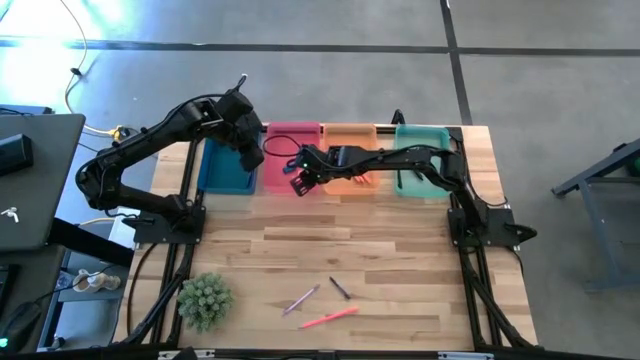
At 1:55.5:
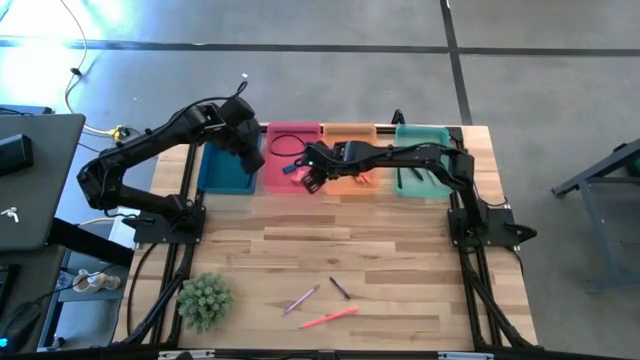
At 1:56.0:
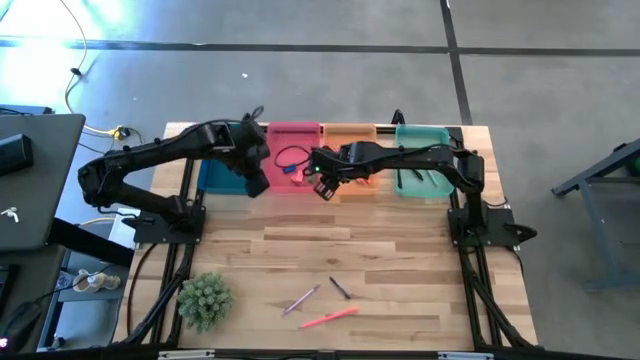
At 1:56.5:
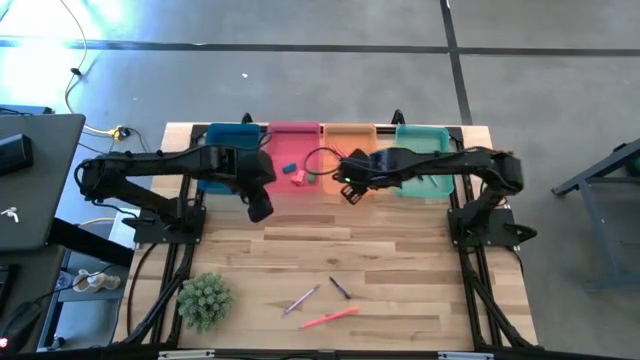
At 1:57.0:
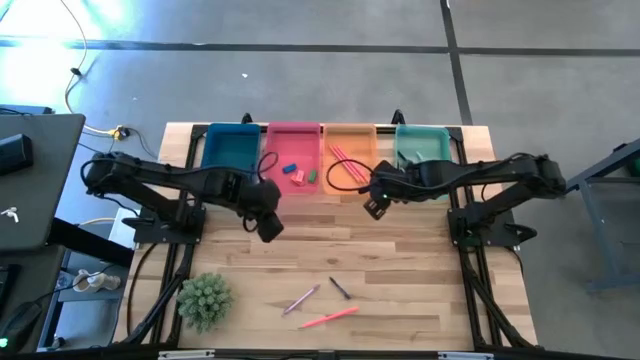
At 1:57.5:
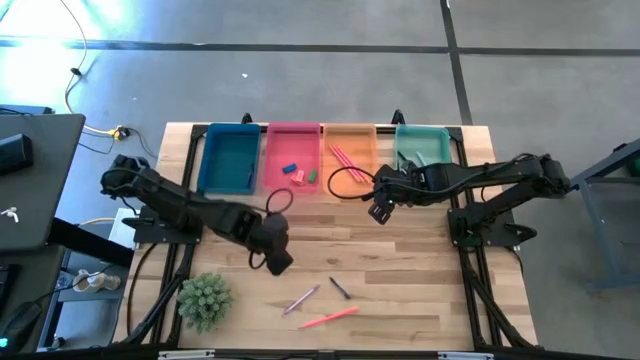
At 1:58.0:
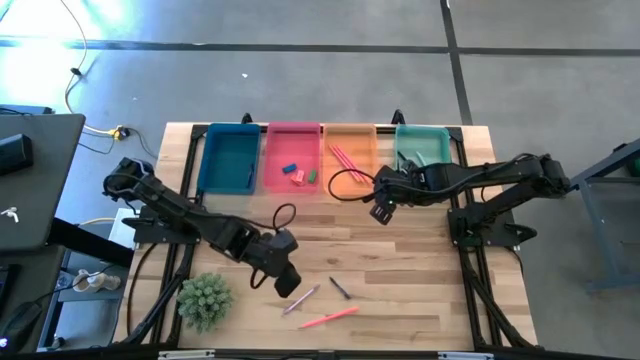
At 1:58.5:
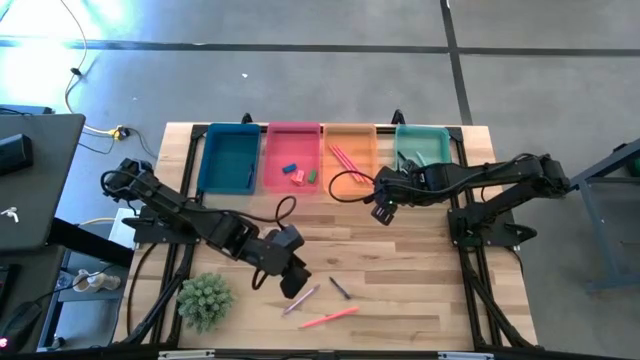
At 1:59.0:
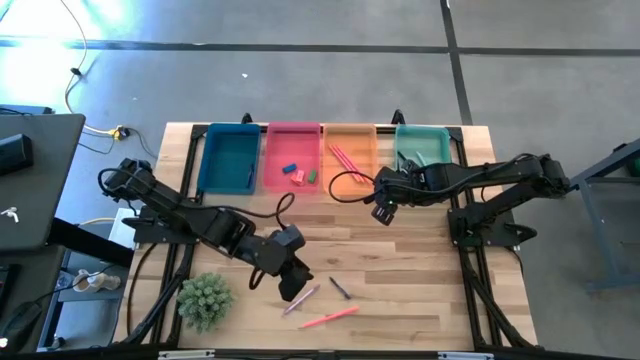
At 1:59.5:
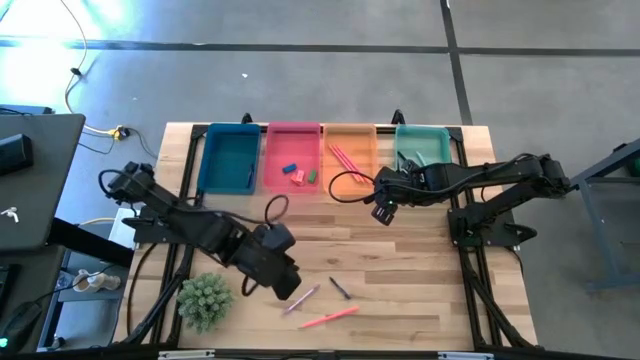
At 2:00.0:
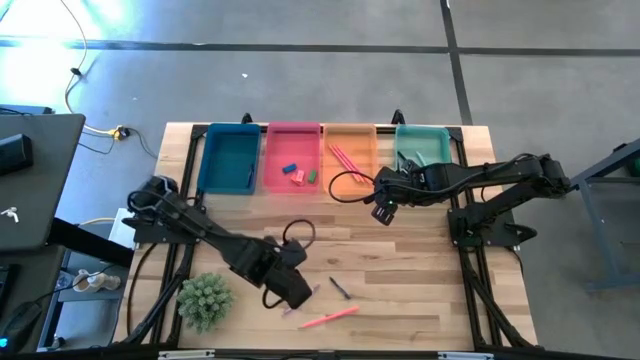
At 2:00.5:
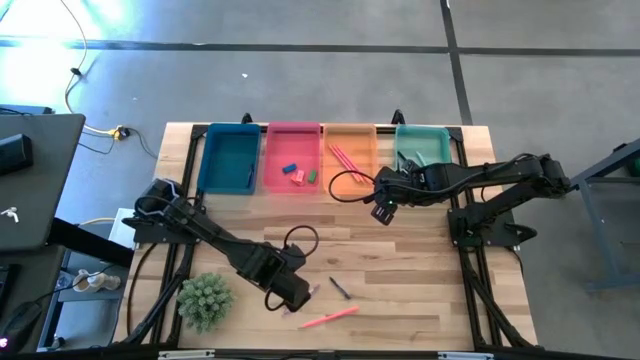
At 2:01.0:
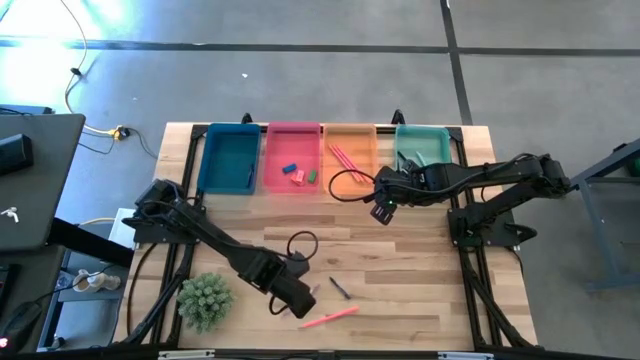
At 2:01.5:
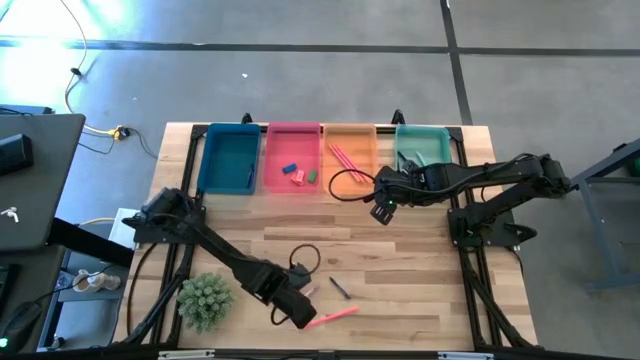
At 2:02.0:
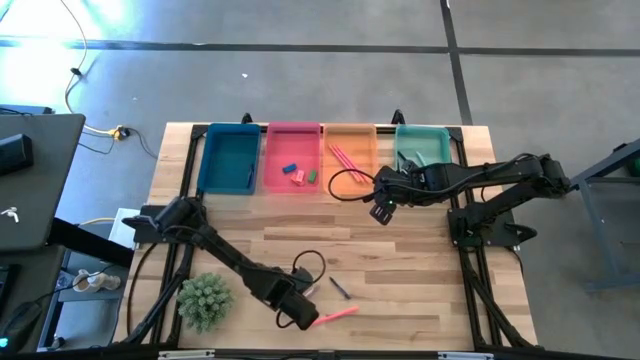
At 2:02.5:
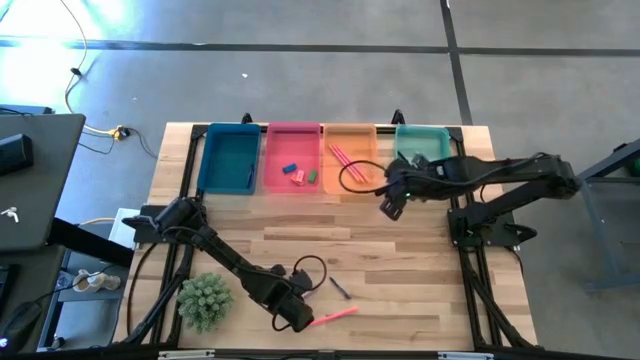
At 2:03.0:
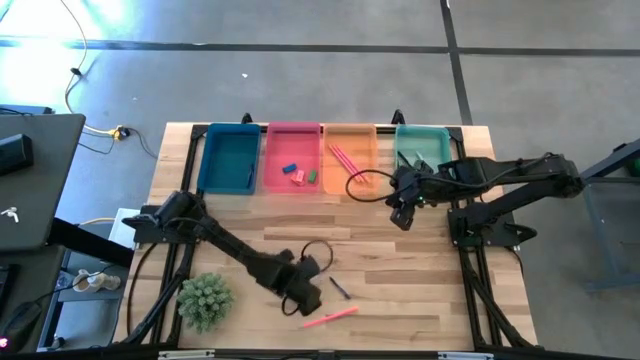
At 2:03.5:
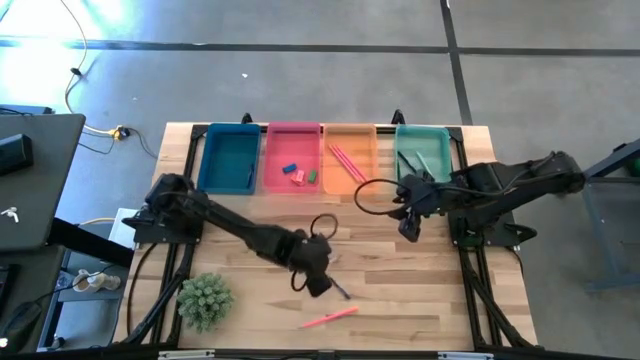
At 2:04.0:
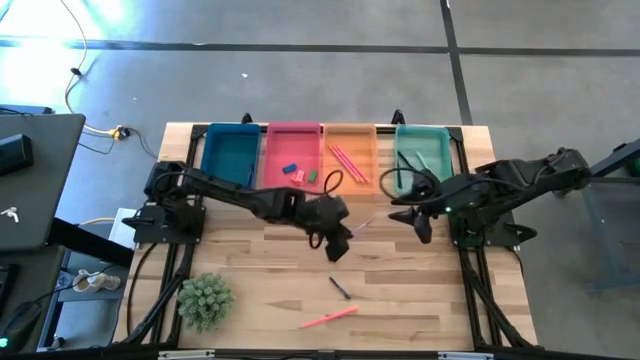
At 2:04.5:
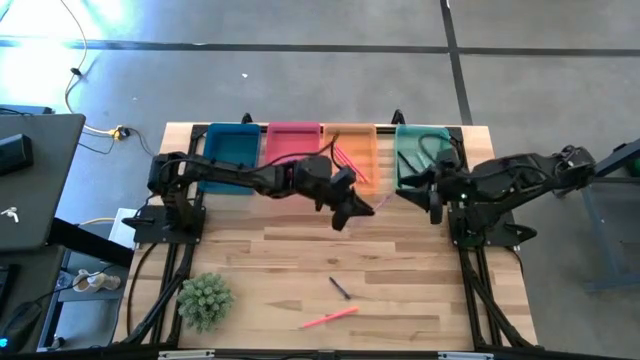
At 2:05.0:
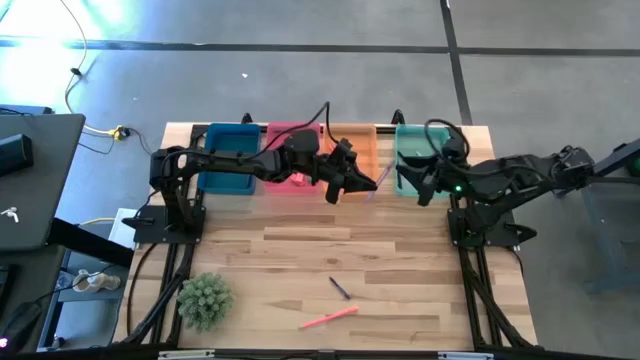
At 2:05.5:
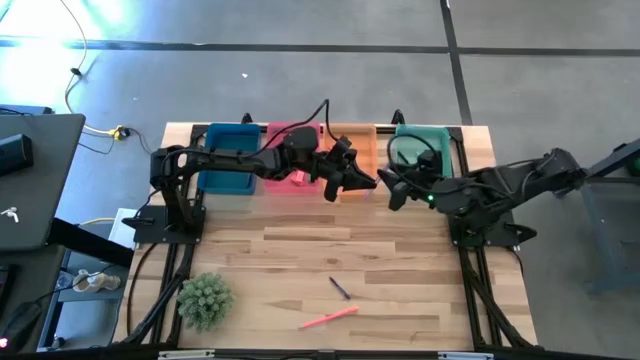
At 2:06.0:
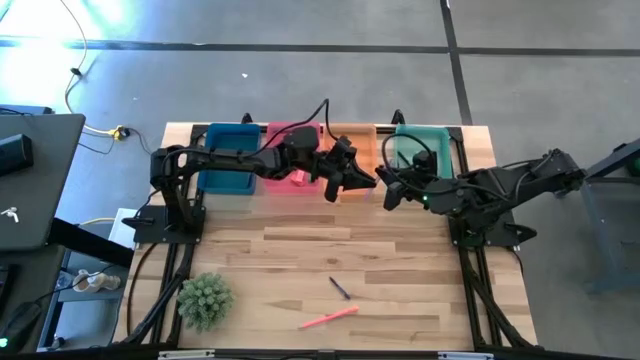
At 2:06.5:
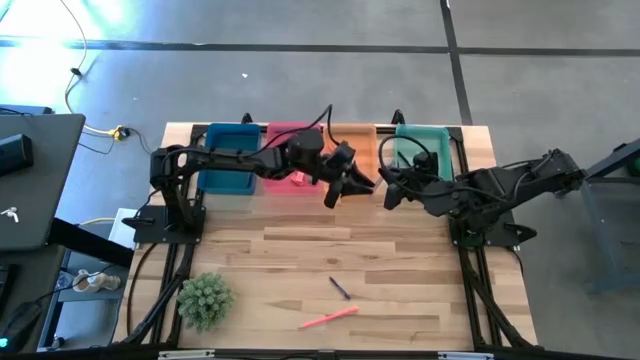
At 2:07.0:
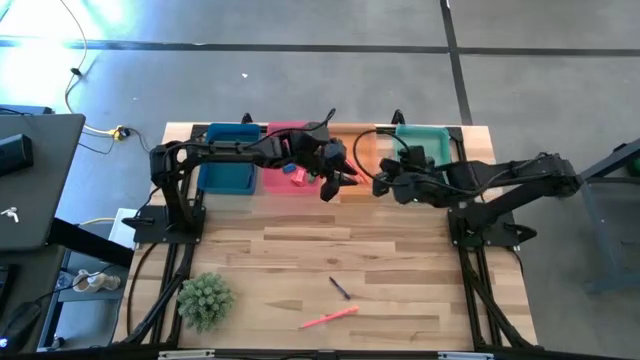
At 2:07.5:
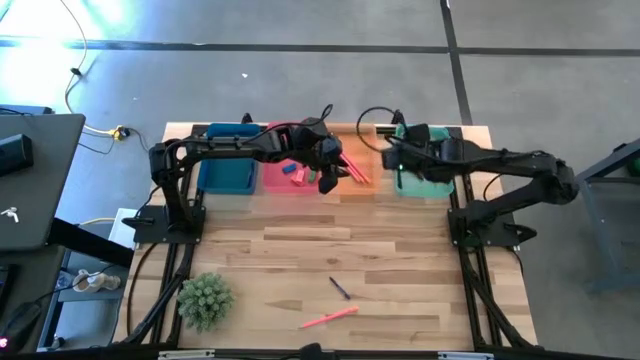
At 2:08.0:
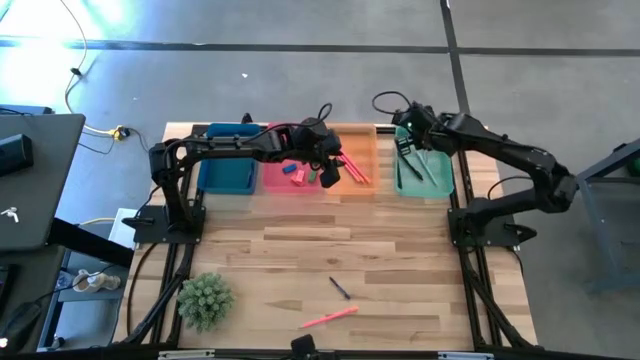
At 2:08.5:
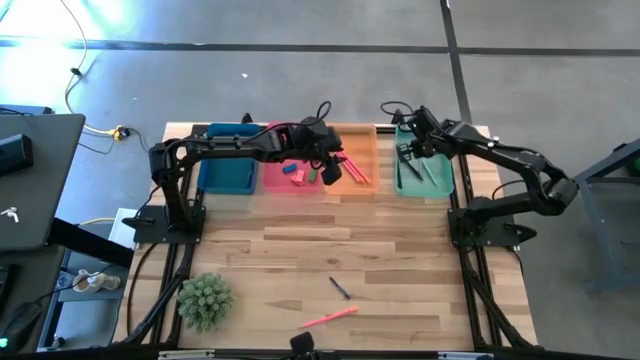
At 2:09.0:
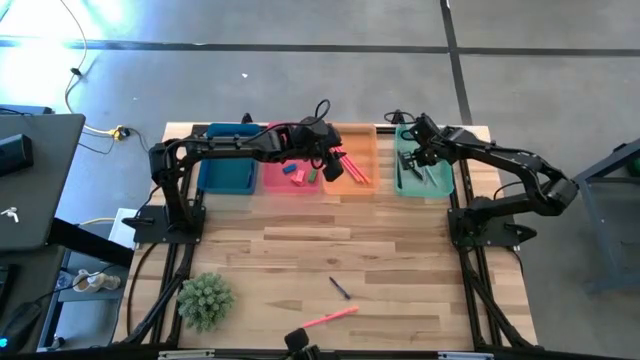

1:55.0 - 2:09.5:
Task: Sort crayons/erasers/pens/pencils in bins
Put the purple pen into the green bin

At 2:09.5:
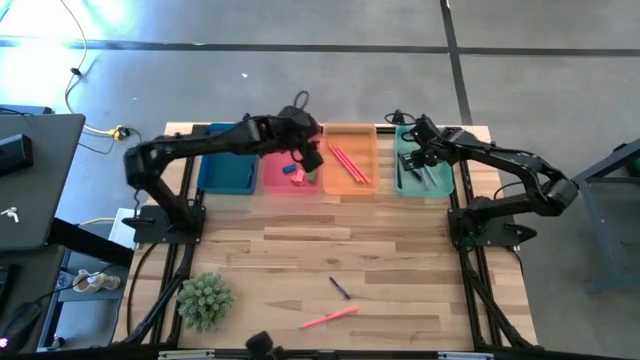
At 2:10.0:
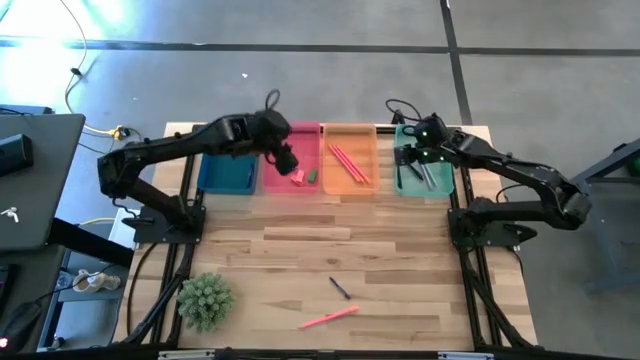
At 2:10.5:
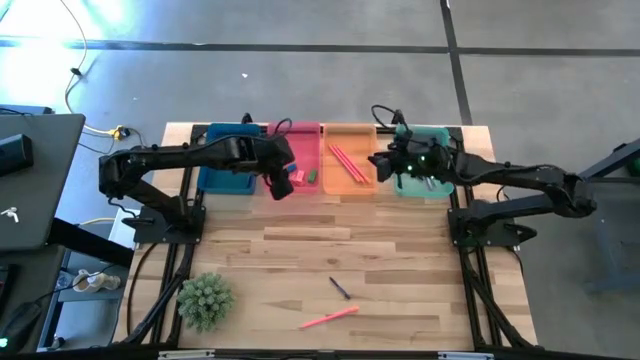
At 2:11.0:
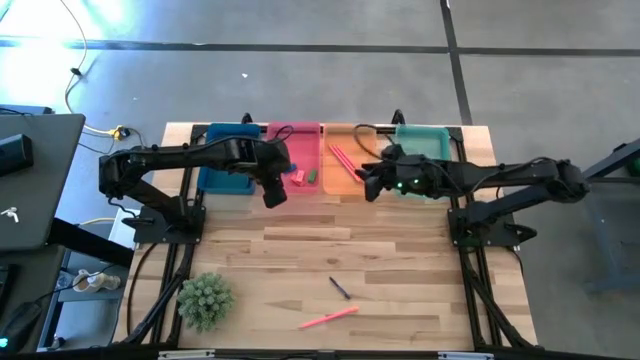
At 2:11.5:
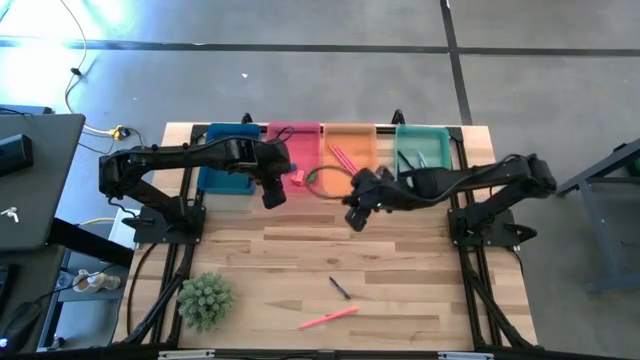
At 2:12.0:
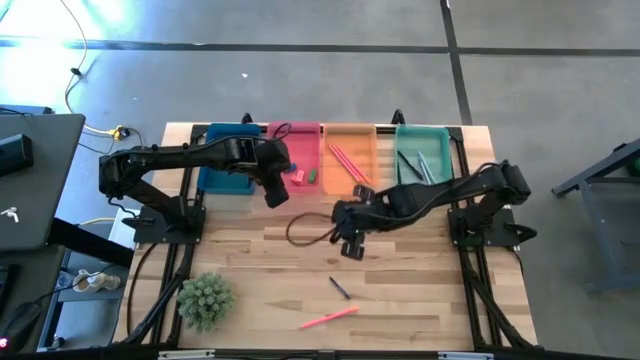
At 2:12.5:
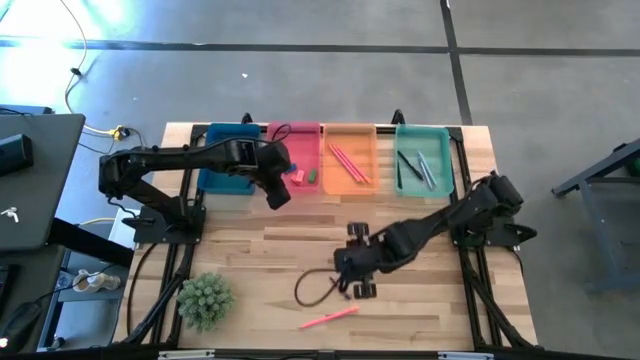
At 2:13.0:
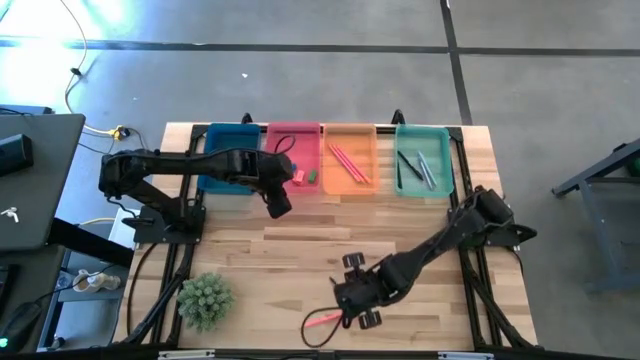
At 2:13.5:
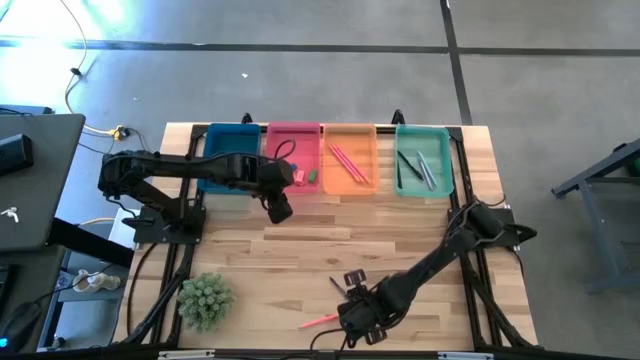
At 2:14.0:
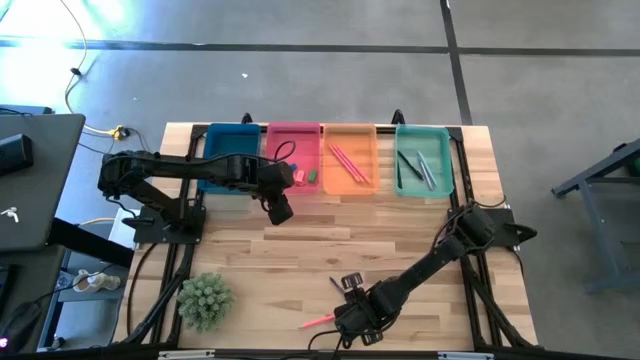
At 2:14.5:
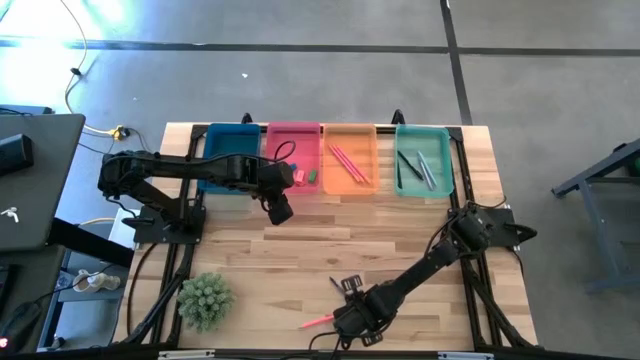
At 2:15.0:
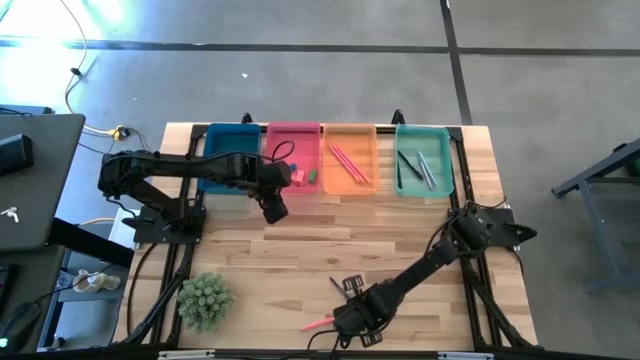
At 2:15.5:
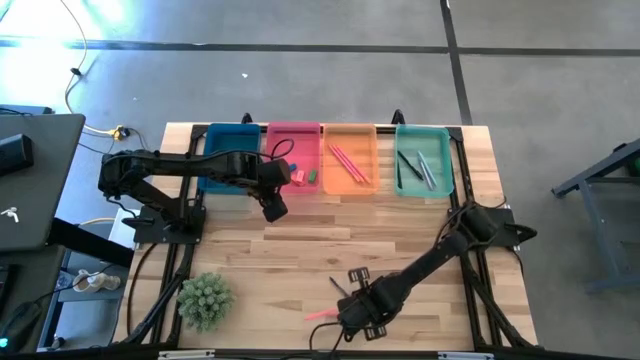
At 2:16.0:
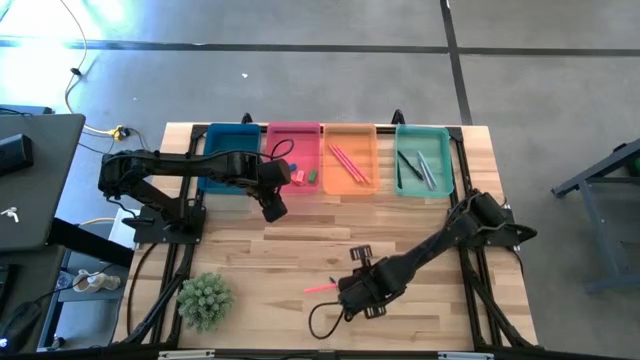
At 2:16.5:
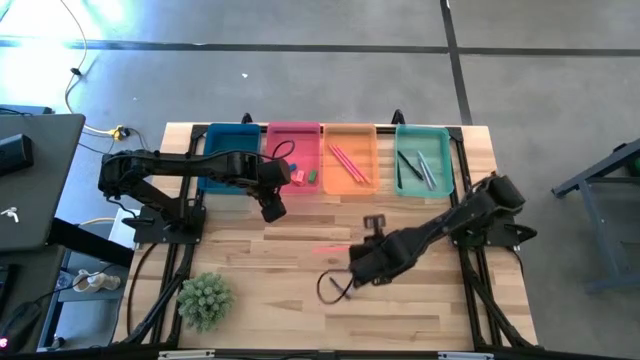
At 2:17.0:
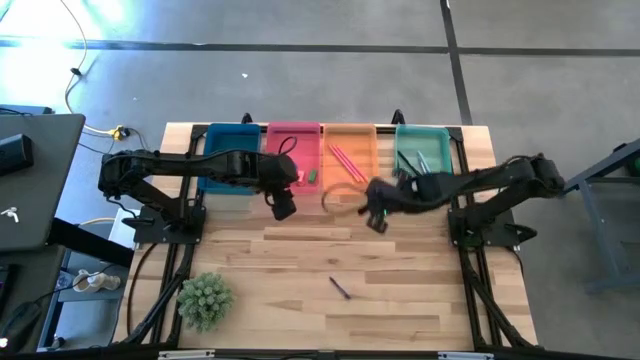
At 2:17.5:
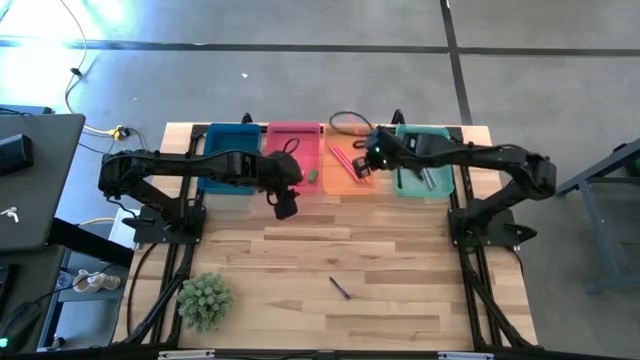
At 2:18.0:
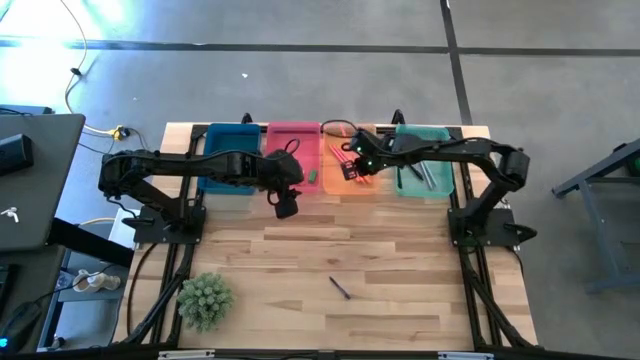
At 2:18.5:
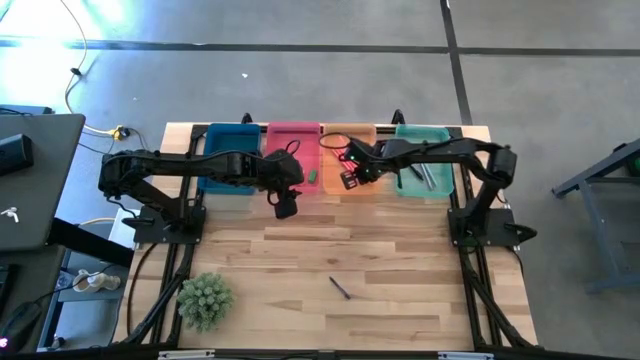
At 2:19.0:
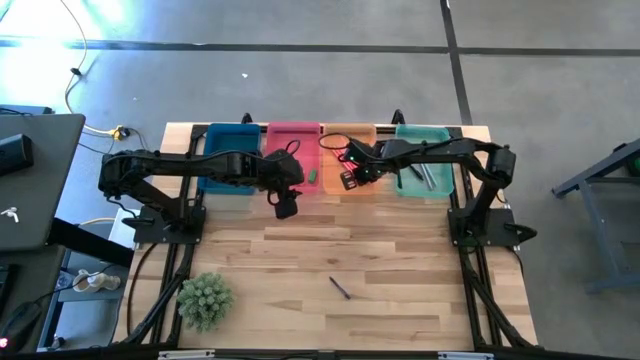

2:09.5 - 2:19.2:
Put the pink pencil into the orange bin
